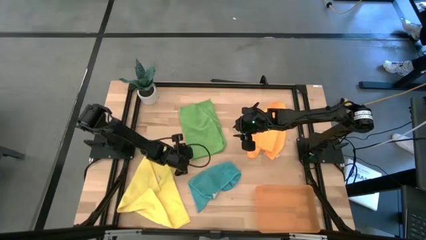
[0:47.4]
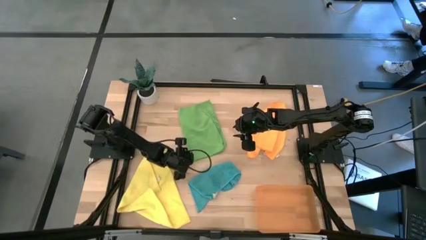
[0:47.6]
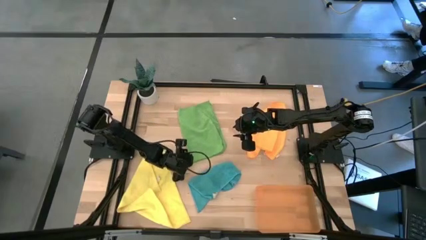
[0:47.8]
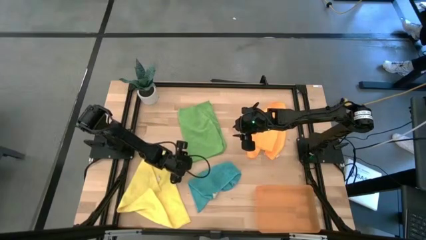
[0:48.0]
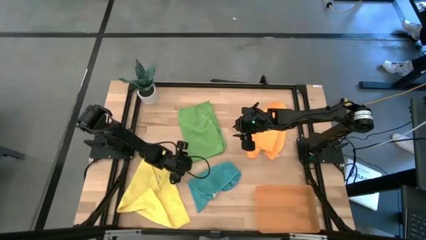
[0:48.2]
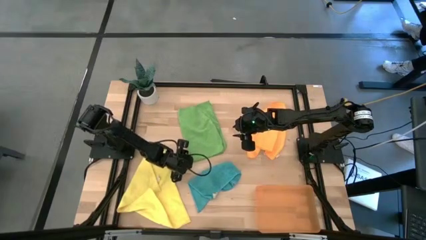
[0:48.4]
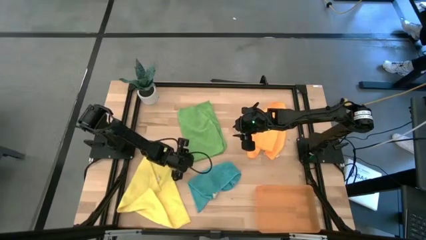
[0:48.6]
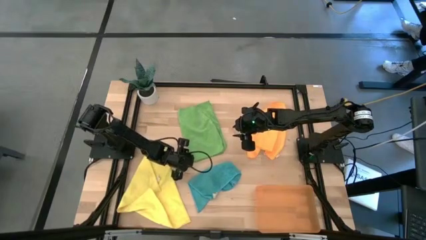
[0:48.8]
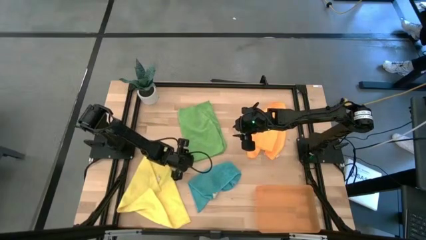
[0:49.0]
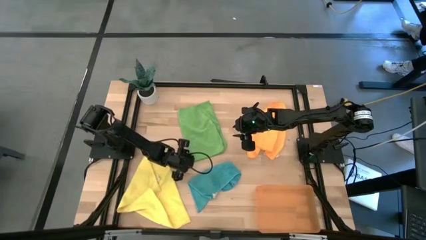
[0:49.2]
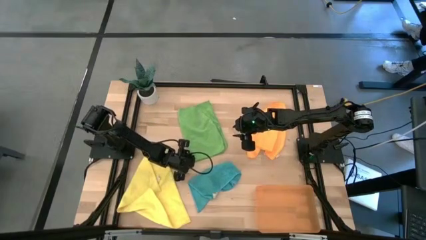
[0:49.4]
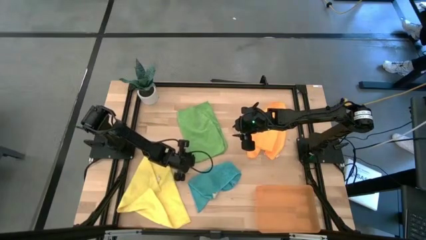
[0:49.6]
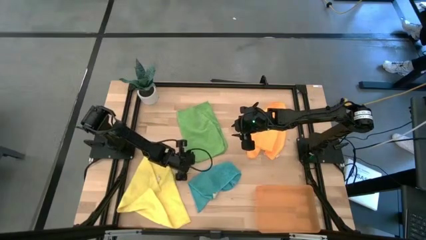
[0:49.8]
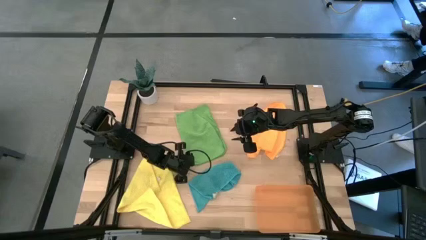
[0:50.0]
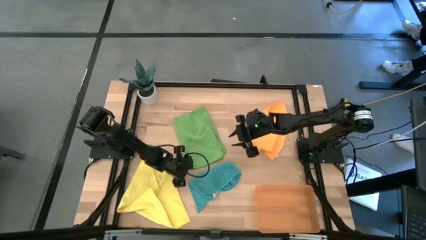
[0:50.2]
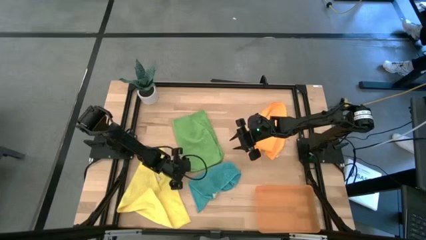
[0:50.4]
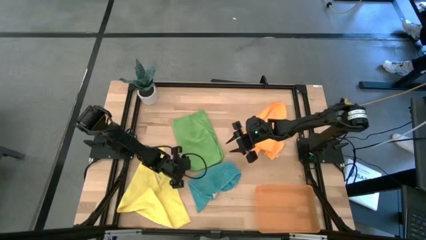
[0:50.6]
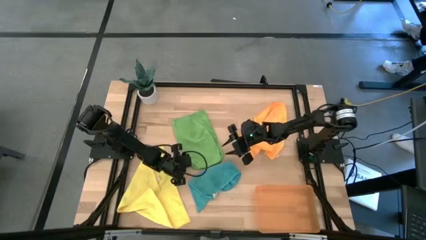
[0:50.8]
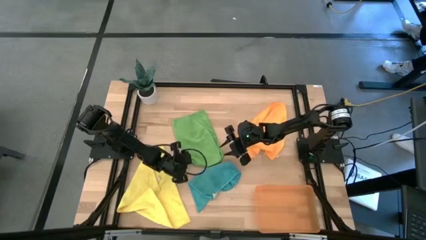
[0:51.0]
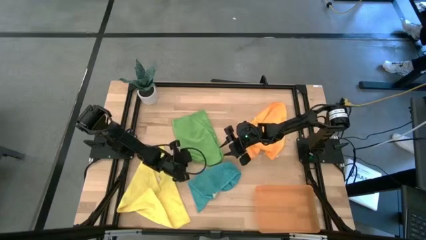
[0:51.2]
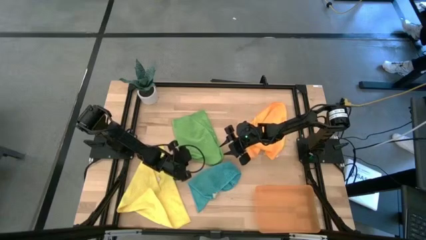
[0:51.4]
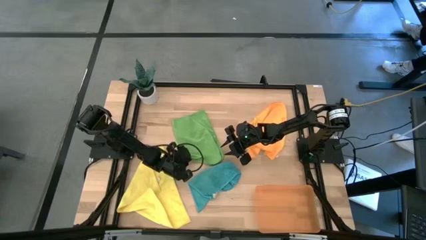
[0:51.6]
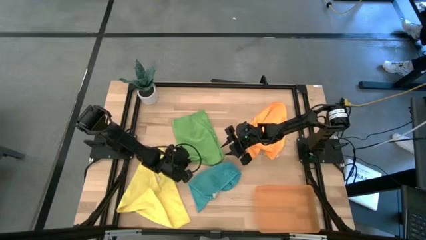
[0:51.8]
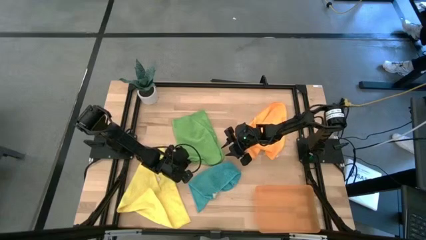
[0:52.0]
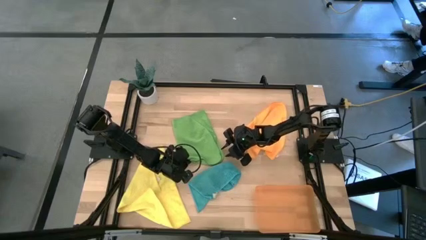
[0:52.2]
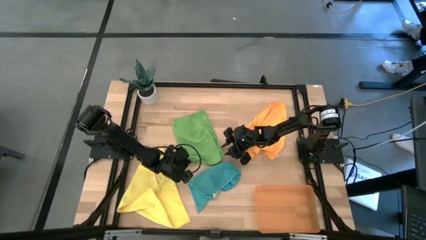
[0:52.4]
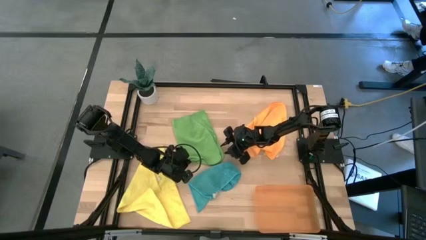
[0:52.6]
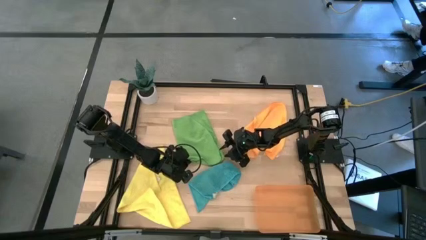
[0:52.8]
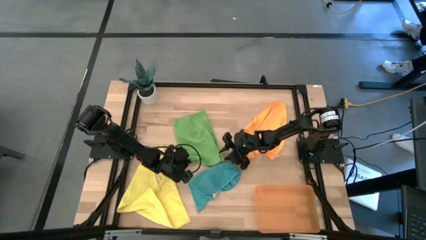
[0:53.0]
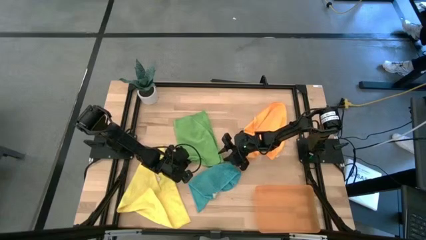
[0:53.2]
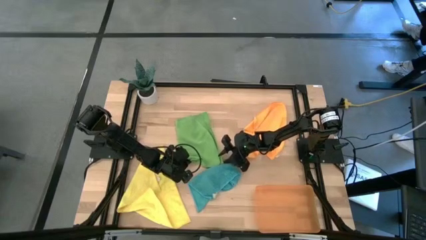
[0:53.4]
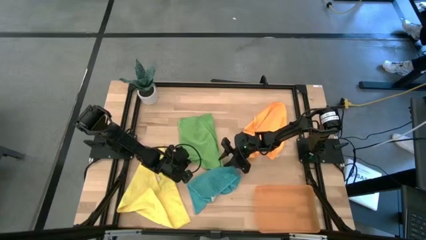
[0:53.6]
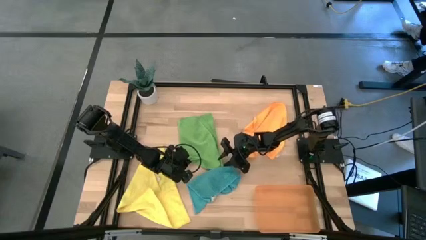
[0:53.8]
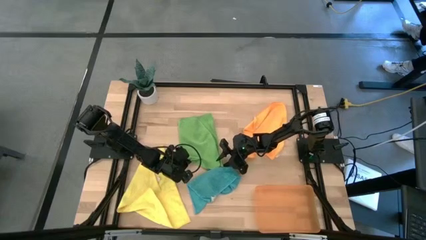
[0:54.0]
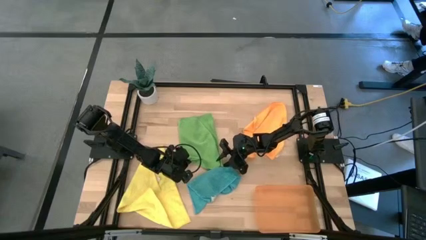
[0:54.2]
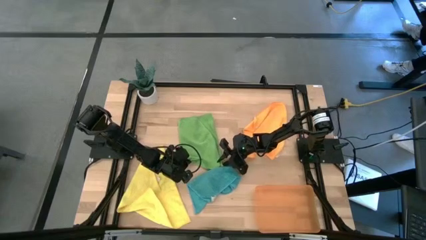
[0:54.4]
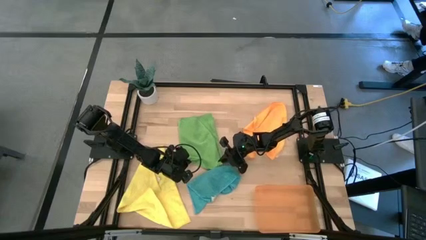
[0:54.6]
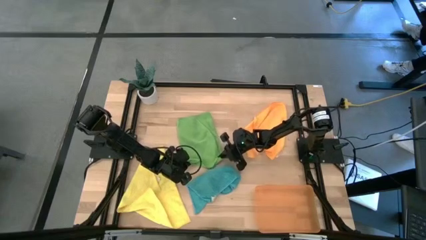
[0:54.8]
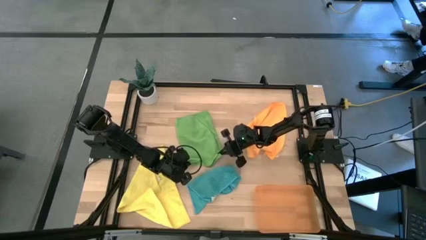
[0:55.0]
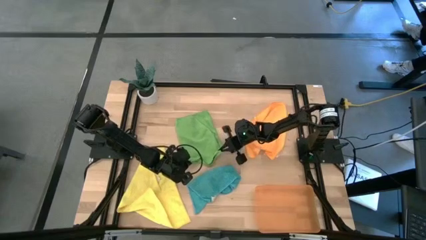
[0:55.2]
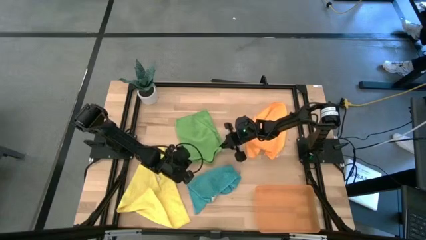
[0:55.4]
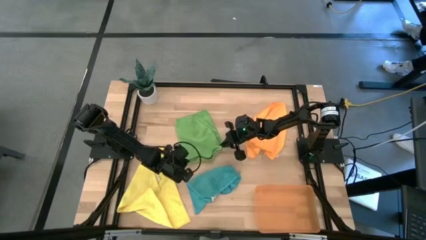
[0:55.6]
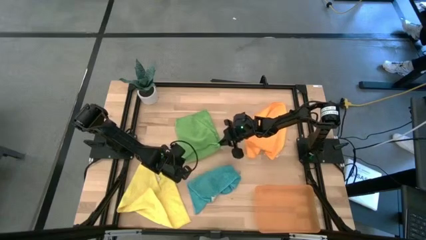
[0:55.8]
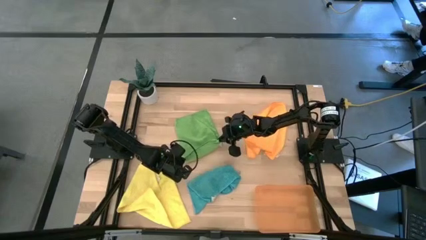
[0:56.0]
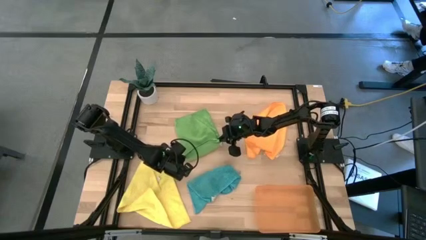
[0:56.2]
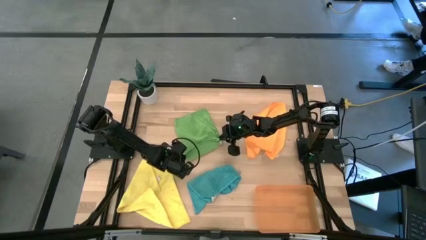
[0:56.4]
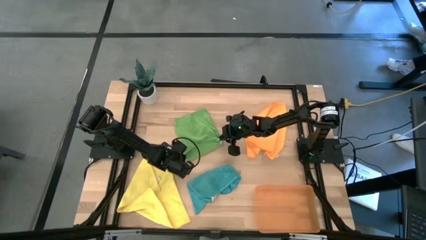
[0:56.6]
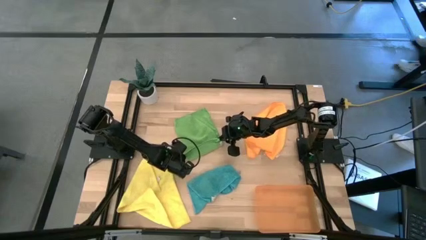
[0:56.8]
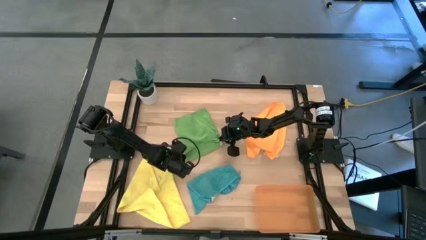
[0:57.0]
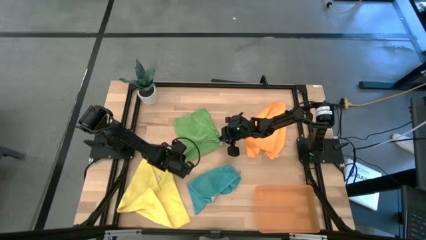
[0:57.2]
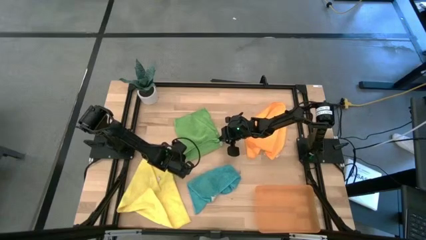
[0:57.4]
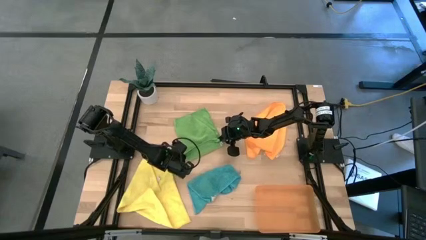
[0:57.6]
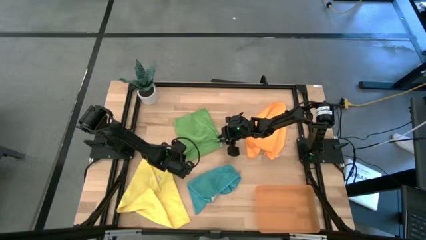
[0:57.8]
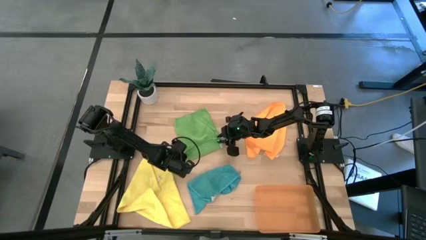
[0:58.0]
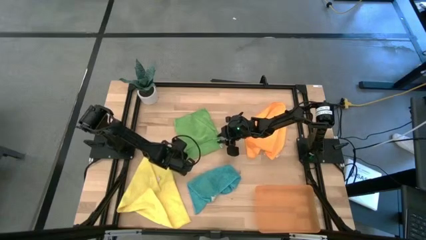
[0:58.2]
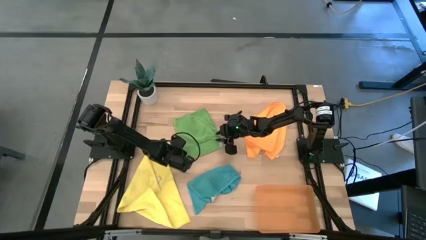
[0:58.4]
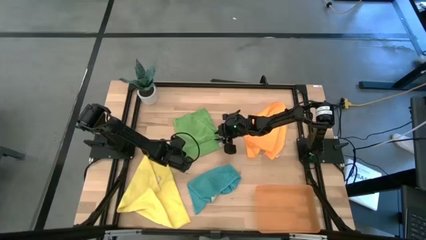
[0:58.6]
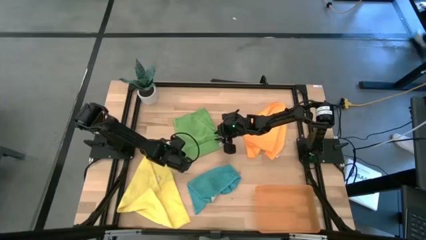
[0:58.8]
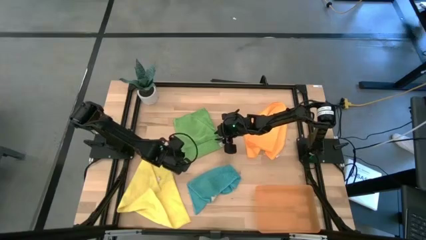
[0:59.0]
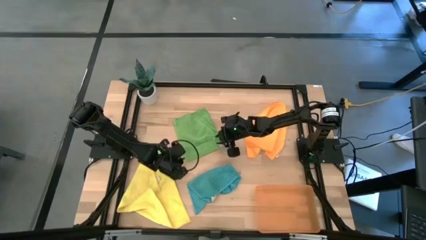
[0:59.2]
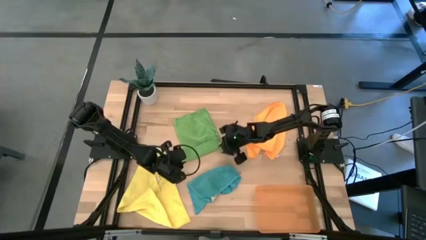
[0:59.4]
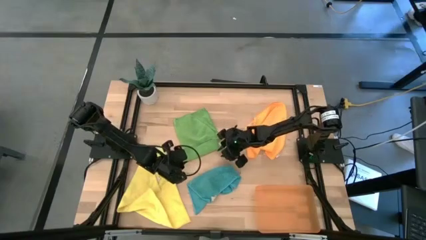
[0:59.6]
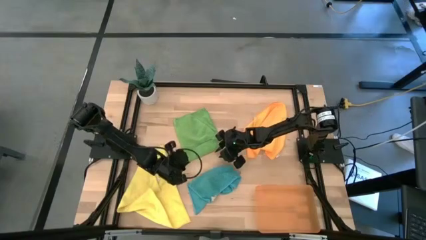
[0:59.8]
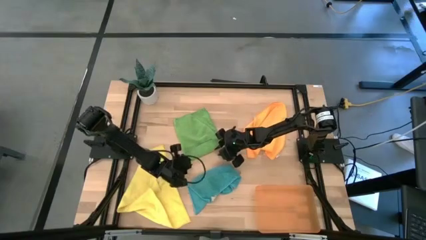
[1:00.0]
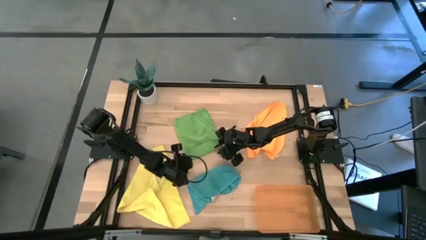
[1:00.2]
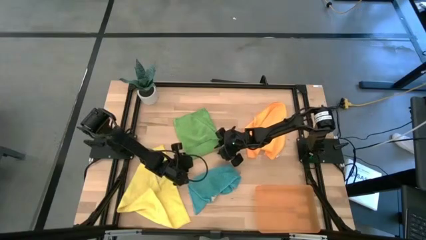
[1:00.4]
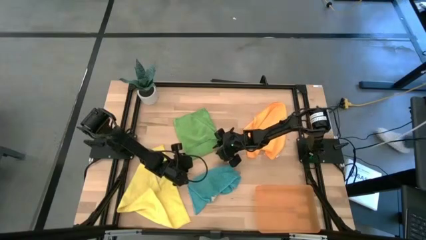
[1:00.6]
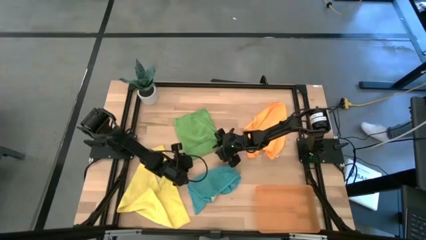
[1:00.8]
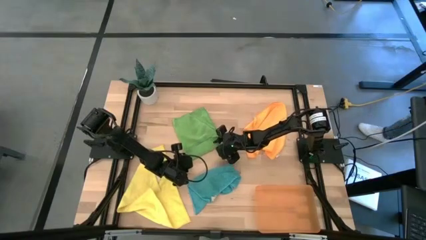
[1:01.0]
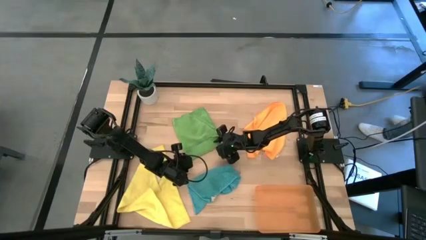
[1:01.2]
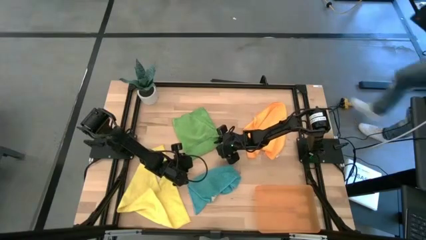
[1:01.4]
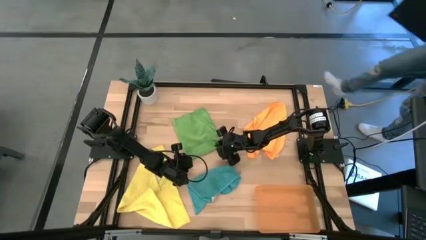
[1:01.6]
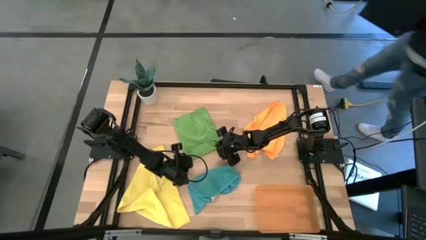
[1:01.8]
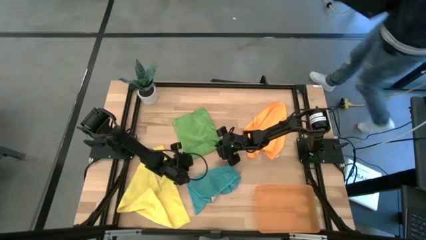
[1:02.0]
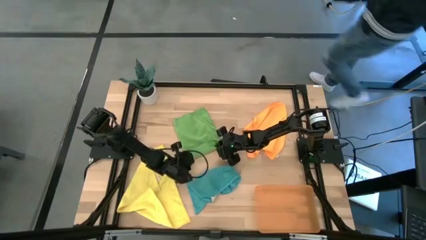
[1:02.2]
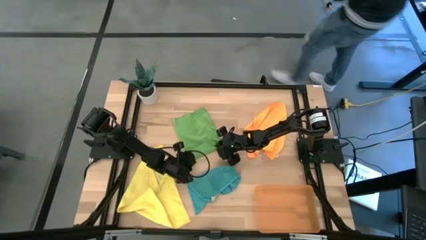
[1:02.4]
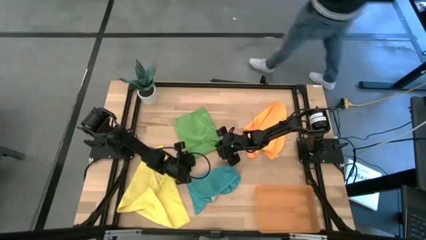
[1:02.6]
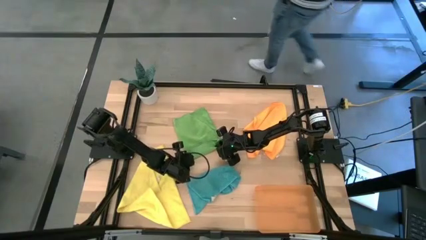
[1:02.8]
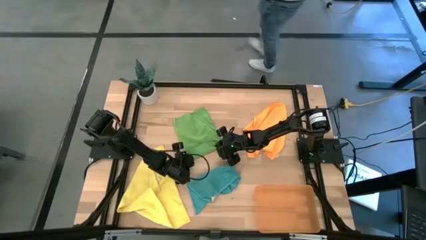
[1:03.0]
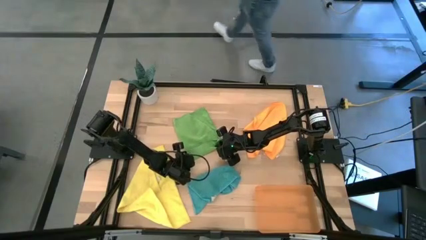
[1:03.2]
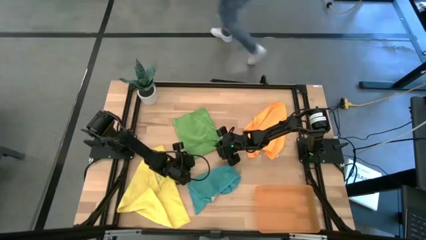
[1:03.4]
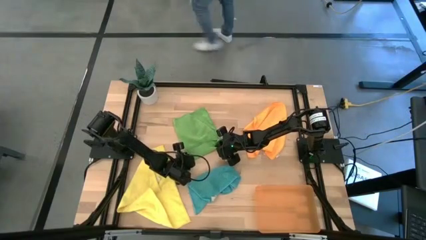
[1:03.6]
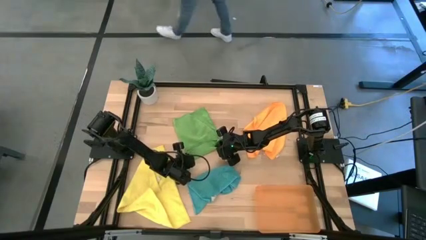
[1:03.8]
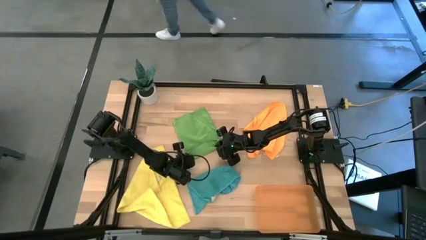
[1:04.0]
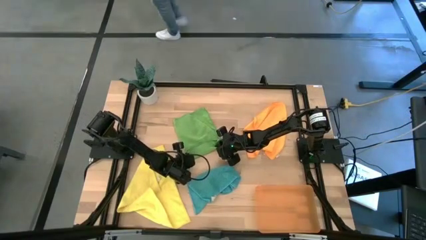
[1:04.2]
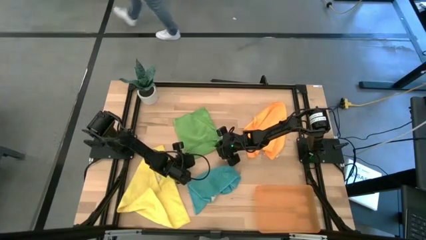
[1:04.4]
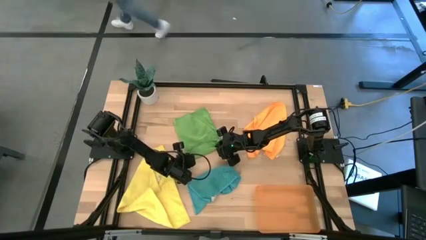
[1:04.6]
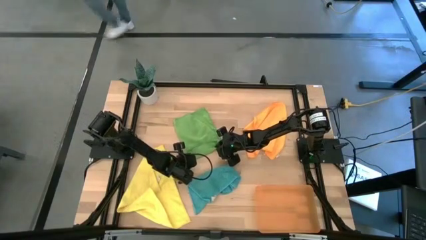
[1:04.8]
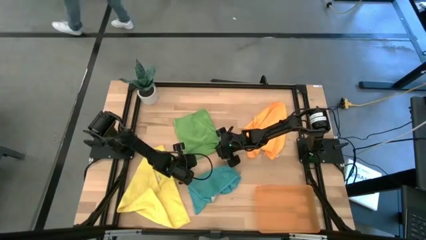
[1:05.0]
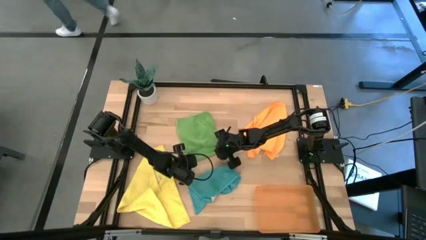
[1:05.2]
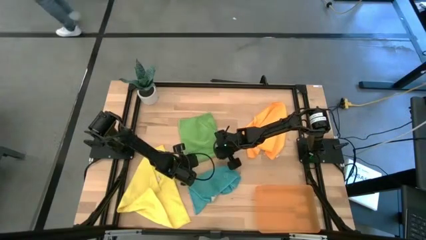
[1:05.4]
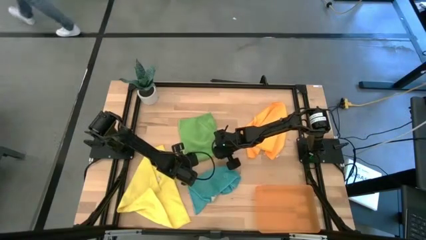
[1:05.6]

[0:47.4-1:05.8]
Task: Roll microfiber towels into tight, uniform cylinder then place into a basket
Roll the green microfiber towel
